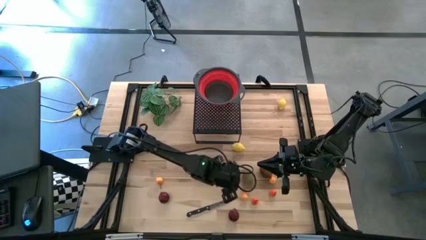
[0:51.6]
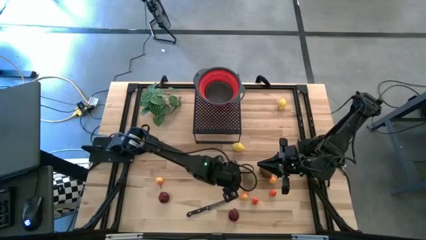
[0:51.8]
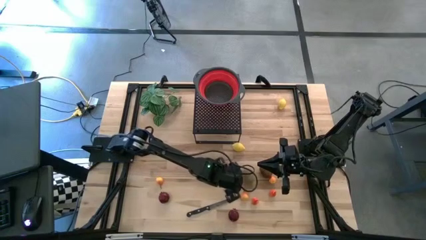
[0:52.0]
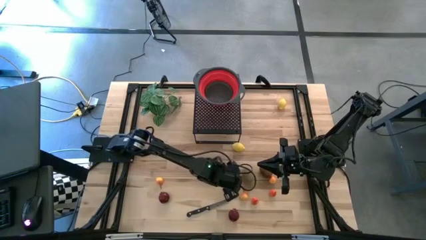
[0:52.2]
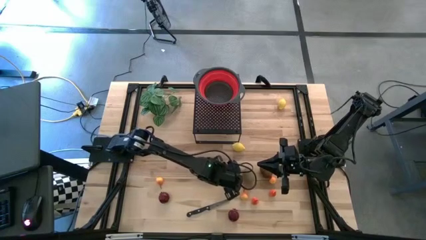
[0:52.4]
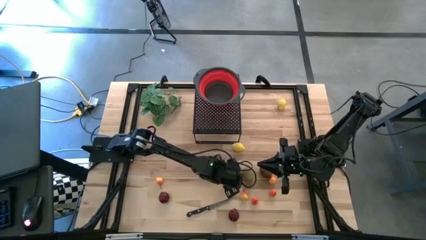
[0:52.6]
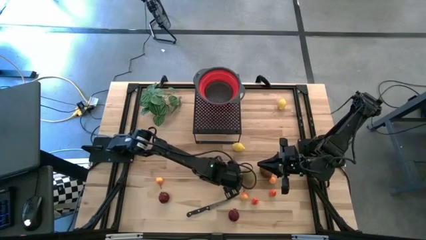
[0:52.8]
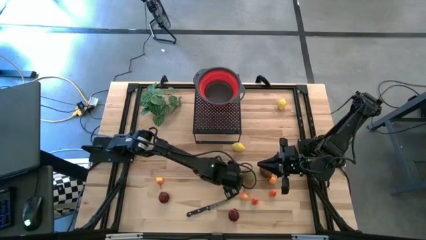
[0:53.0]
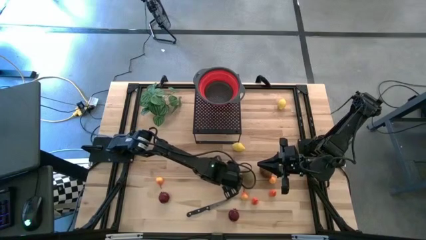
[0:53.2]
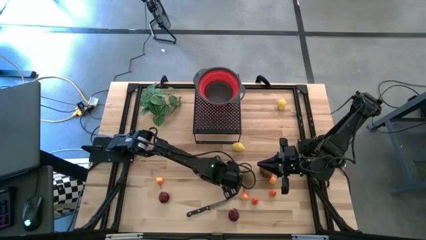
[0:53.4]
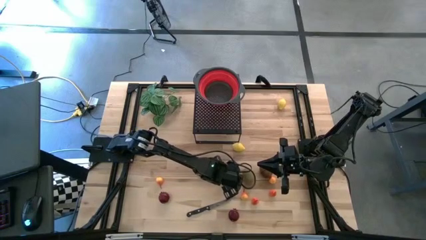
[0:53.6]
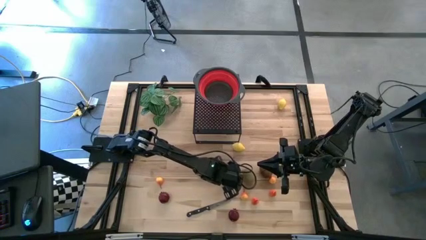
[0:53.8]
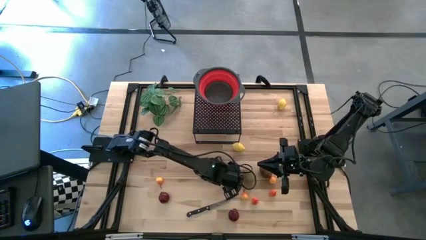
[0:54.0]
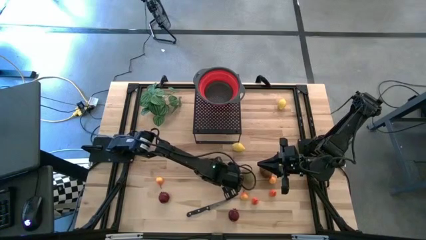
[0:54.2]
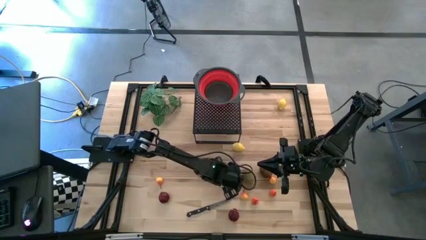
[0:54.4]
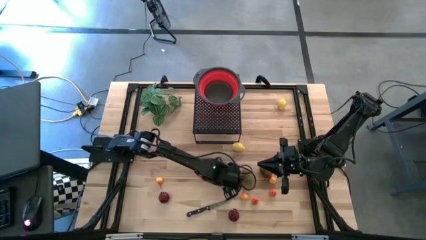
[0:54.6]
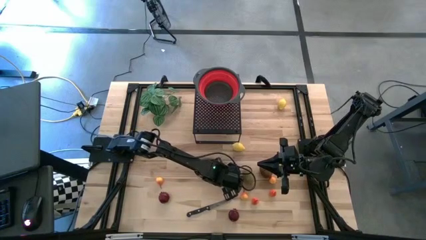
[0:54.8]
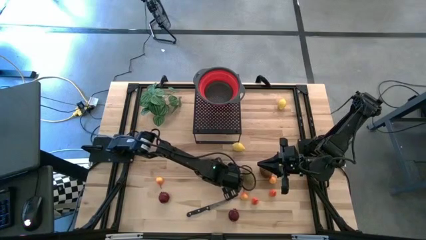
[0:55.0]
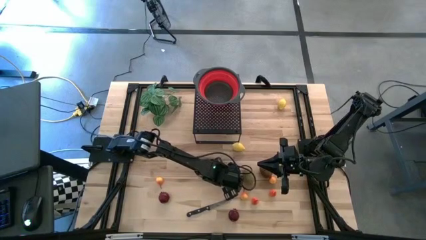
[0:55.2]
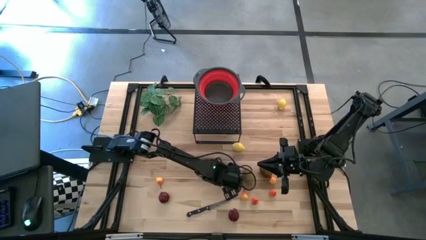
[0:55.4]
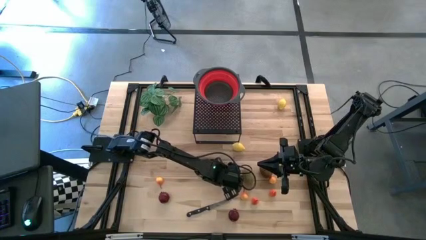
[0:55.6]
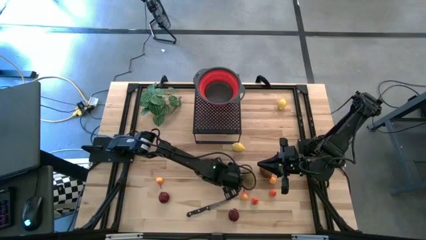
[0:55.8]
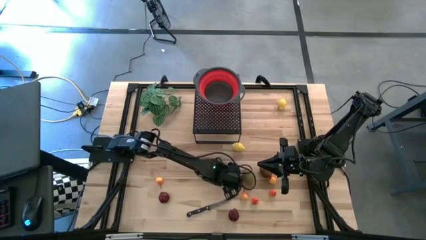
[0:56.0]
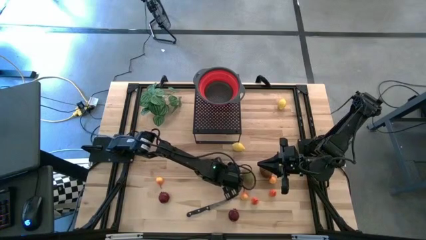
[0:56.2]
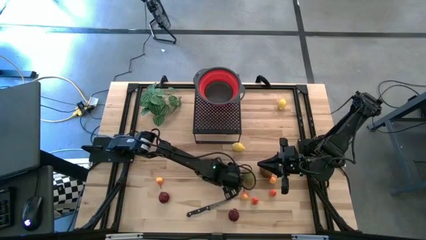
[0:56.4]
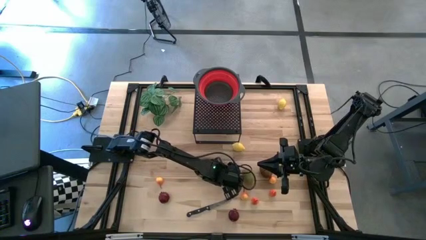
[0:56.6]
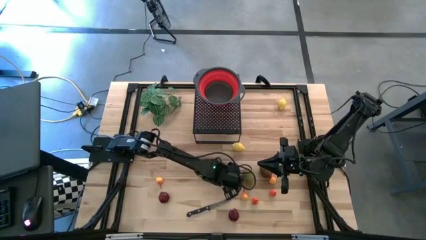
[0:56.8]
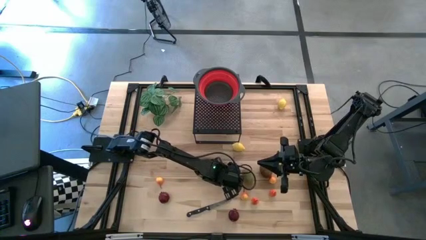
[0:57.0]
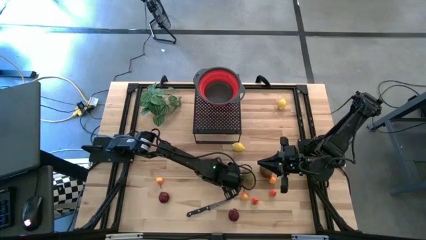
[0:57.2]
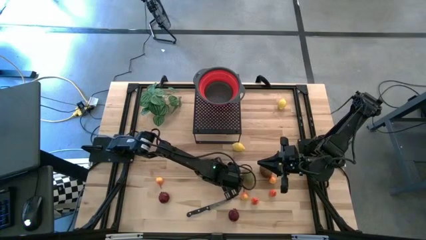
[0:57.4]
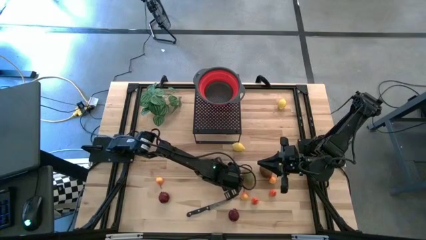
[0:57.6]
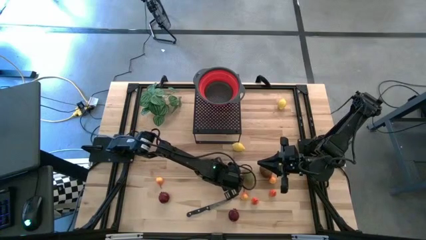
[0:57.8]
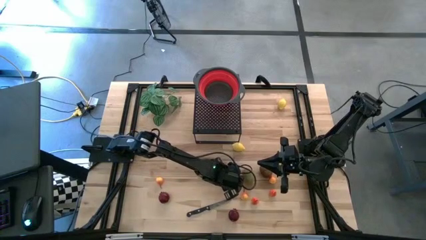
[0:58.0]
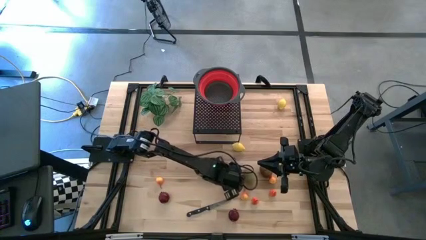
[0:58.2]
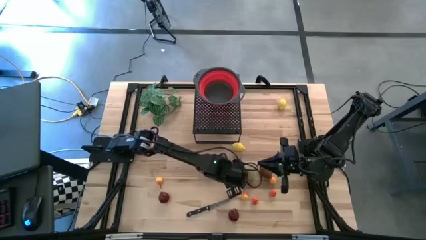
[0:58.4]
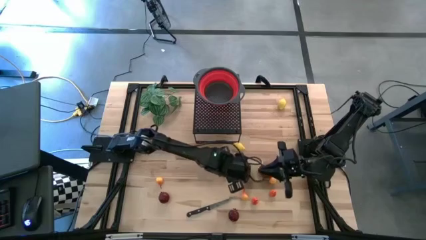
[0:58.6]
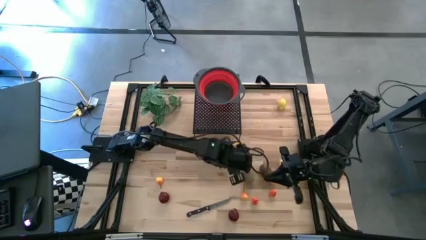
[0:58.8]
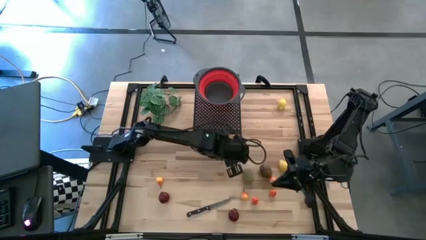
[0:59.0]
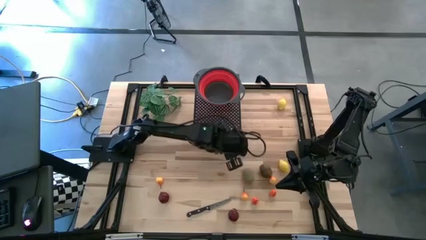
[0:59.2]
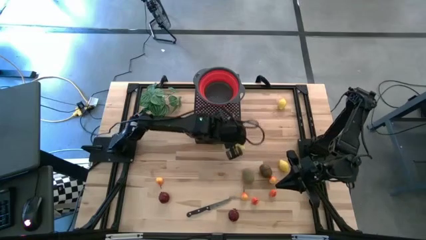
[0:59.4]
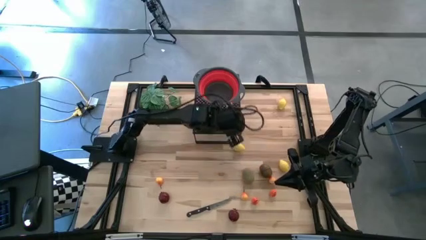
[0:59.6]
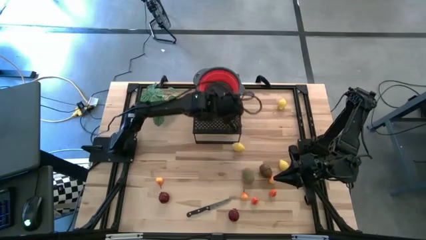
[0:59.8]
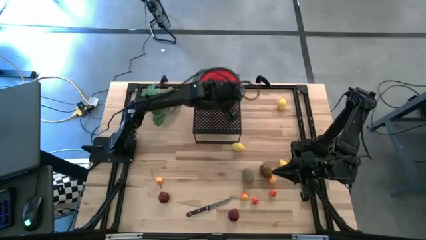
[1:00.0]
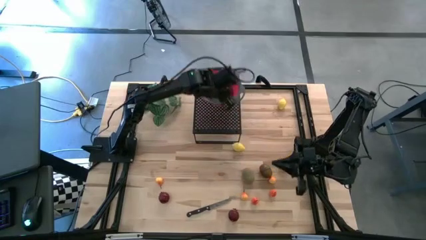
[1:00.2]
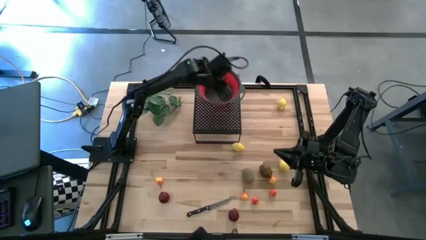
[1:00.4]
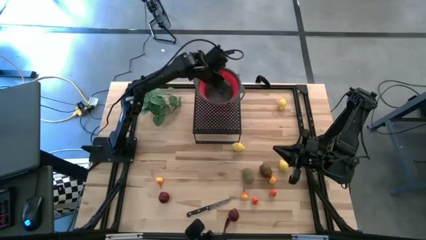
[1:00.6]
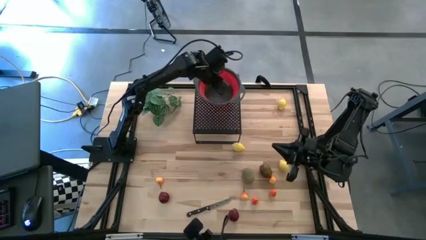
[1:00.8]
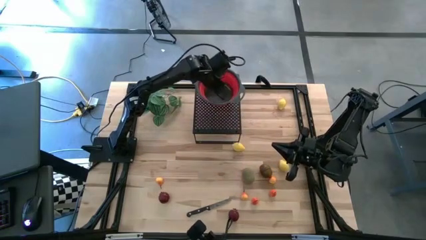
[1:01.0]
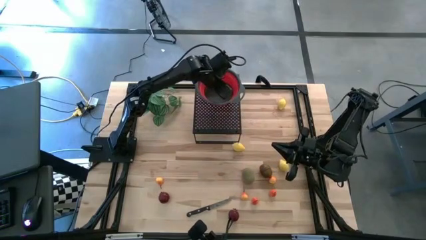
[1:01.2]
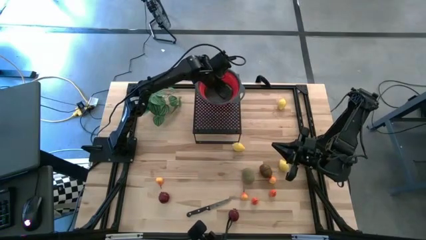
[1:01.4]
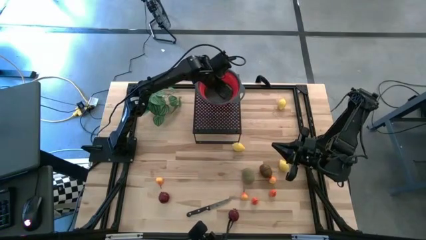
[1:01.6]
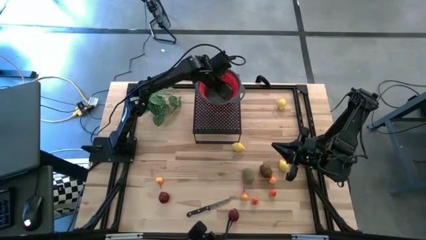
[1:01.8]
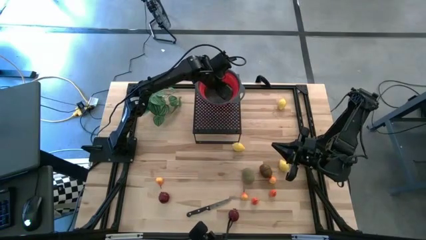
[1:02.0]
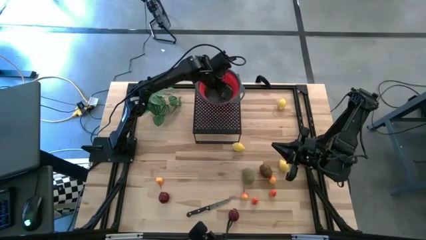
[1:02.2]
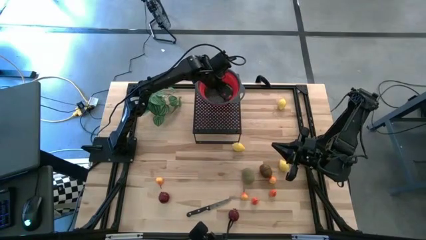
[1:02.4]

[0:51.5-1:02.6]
Task: Pick & Place Fruit
Put the pear into the red strainer bowl
